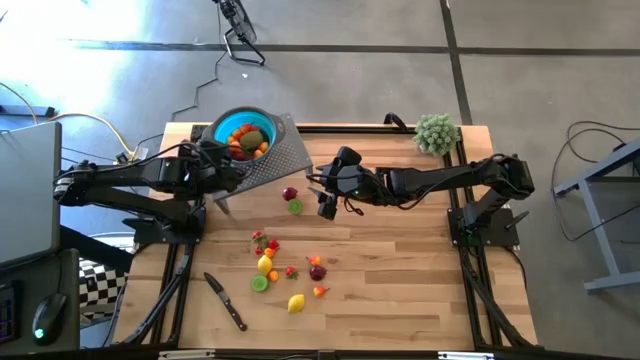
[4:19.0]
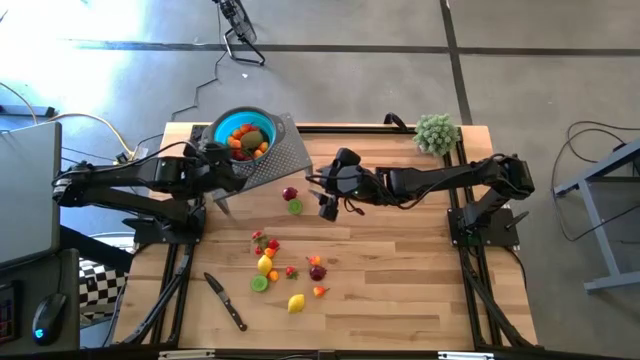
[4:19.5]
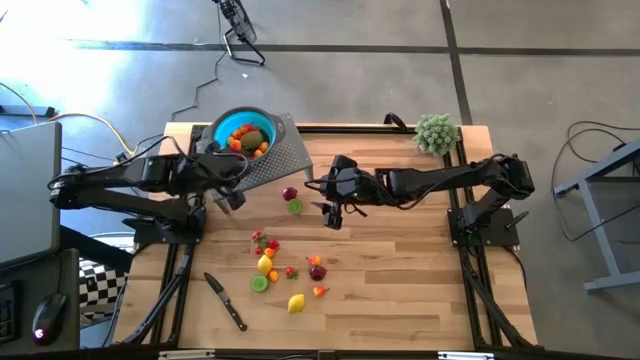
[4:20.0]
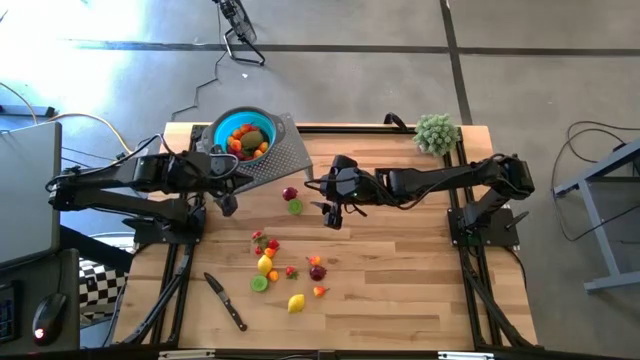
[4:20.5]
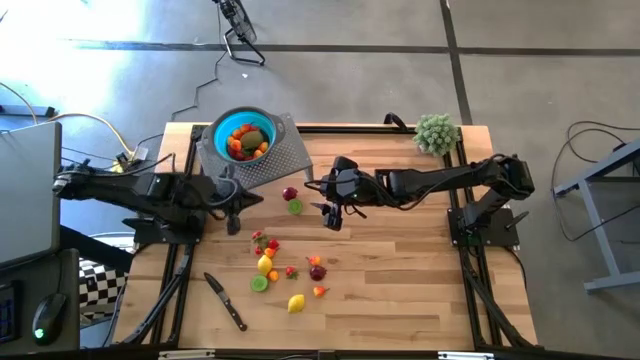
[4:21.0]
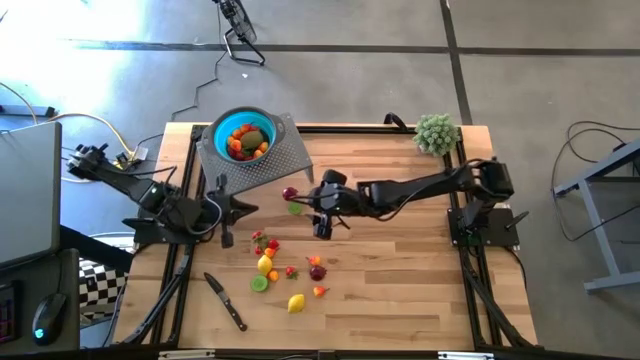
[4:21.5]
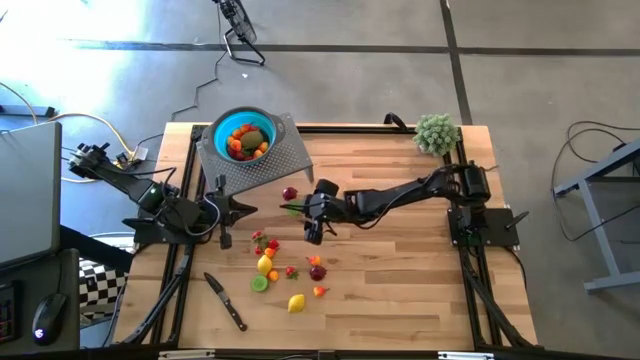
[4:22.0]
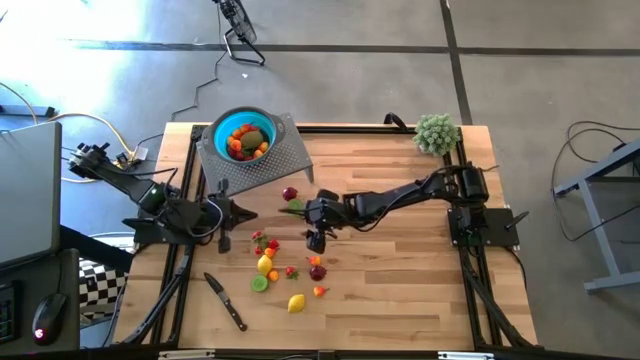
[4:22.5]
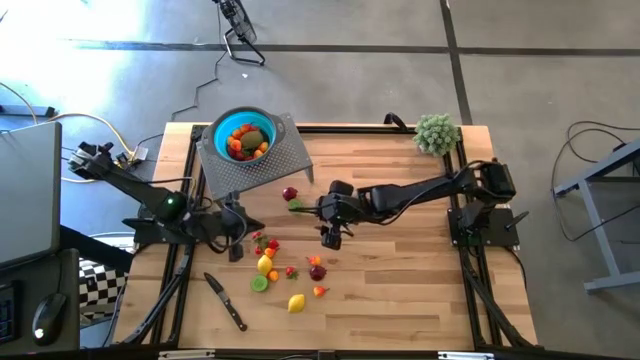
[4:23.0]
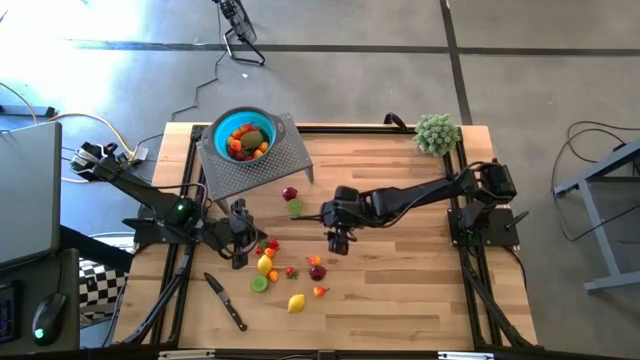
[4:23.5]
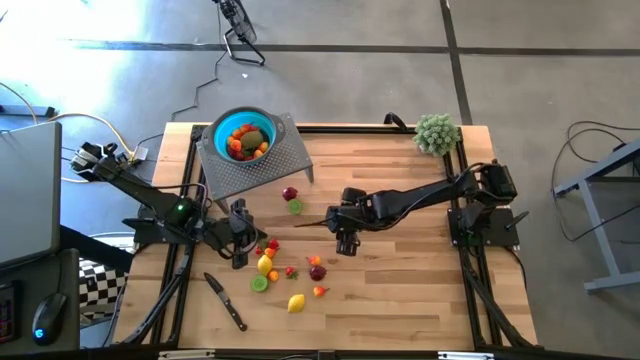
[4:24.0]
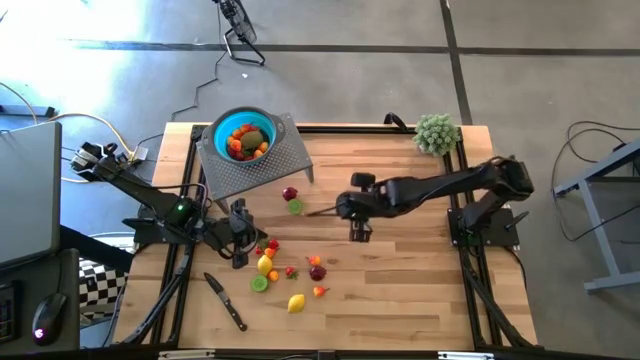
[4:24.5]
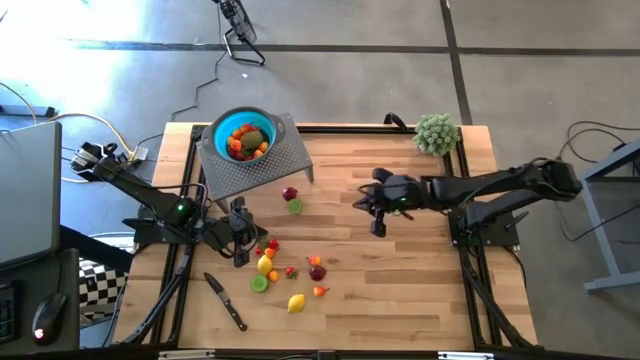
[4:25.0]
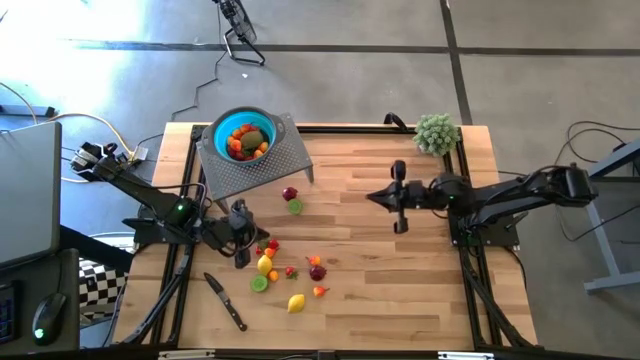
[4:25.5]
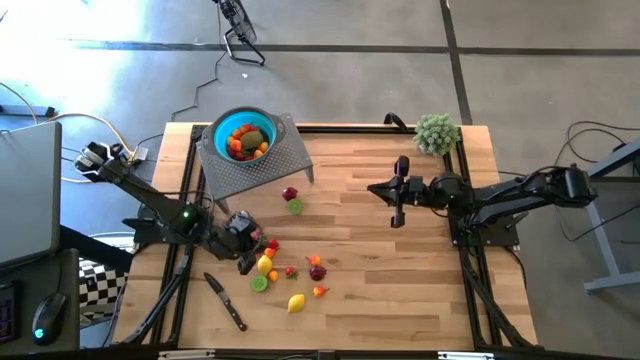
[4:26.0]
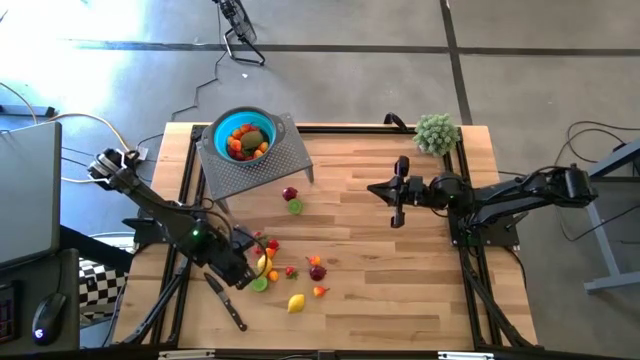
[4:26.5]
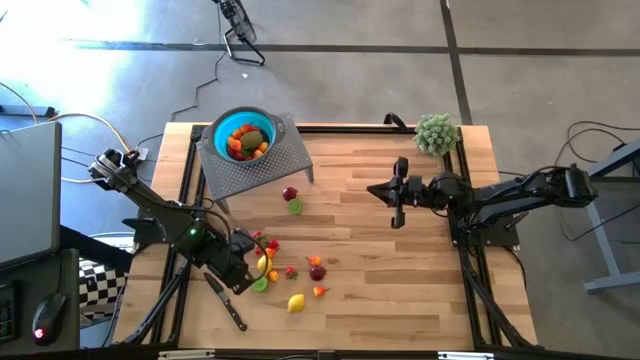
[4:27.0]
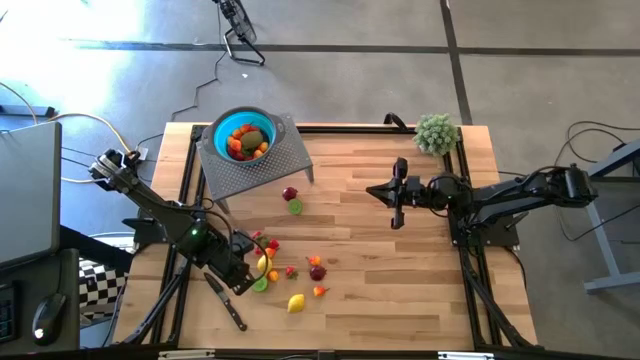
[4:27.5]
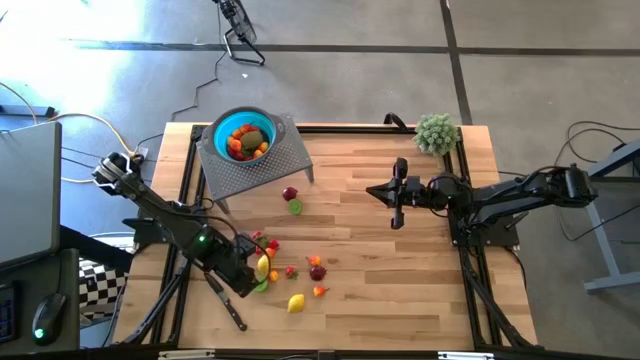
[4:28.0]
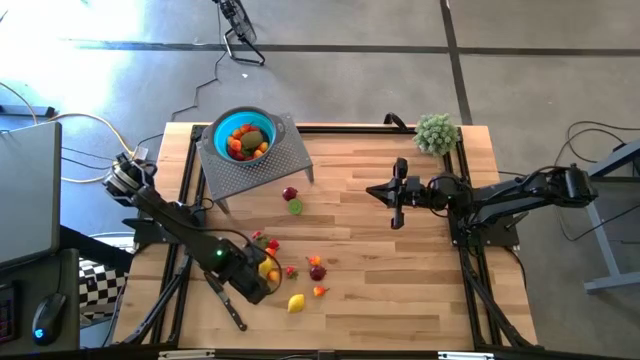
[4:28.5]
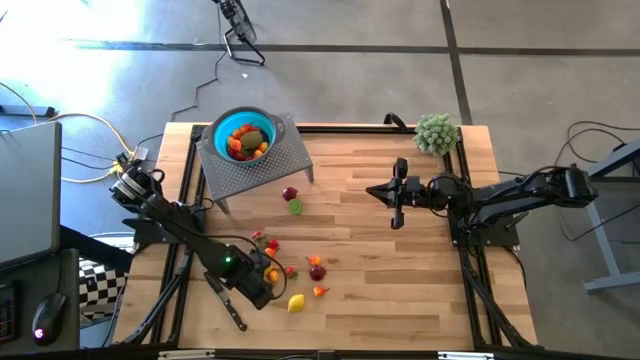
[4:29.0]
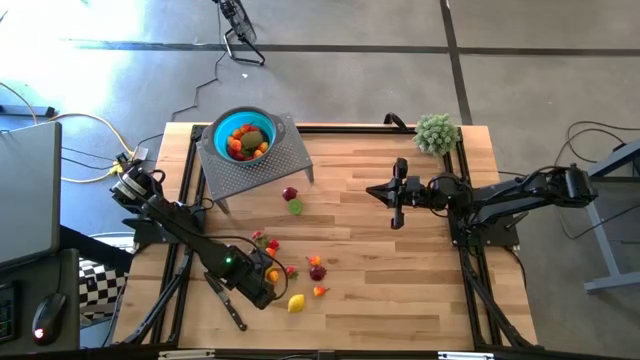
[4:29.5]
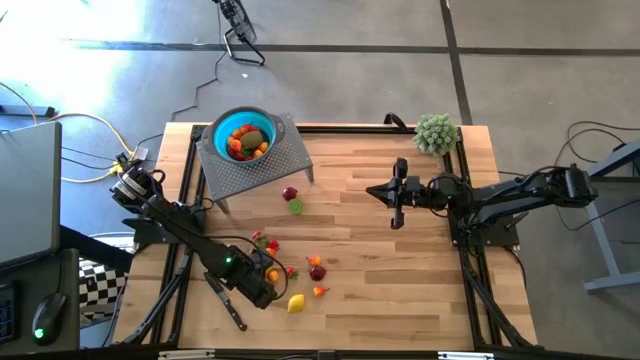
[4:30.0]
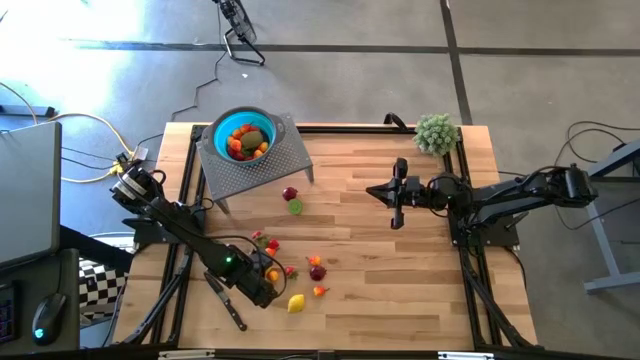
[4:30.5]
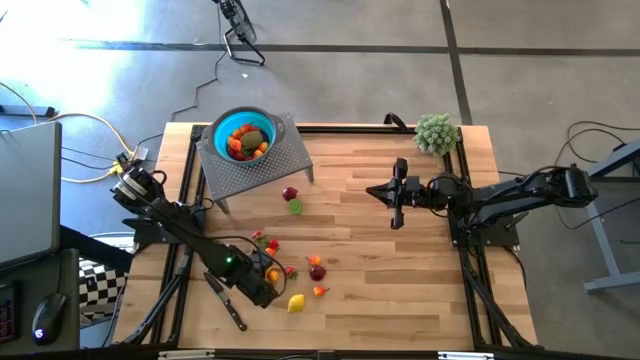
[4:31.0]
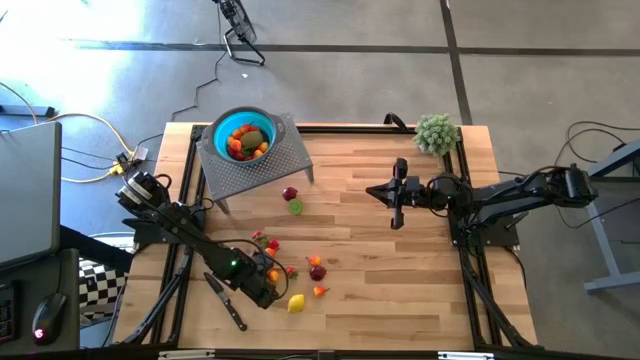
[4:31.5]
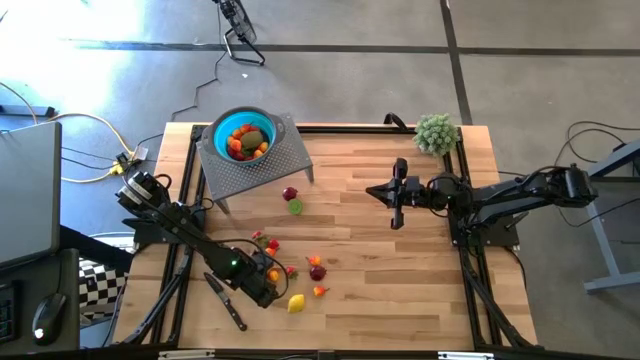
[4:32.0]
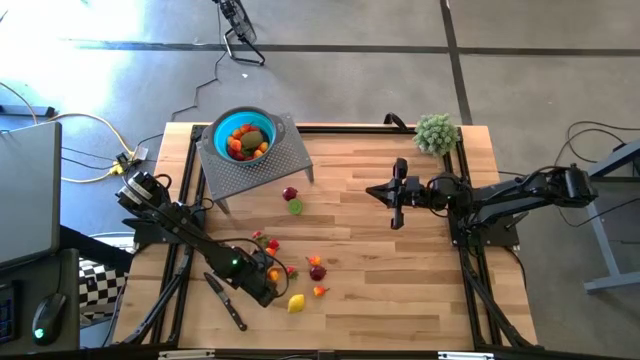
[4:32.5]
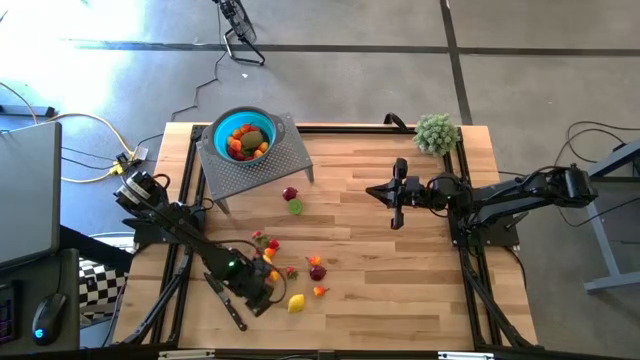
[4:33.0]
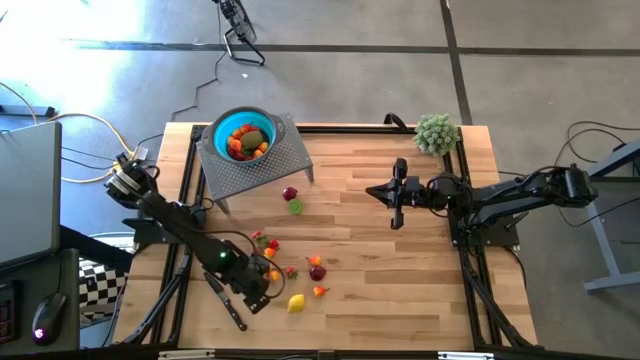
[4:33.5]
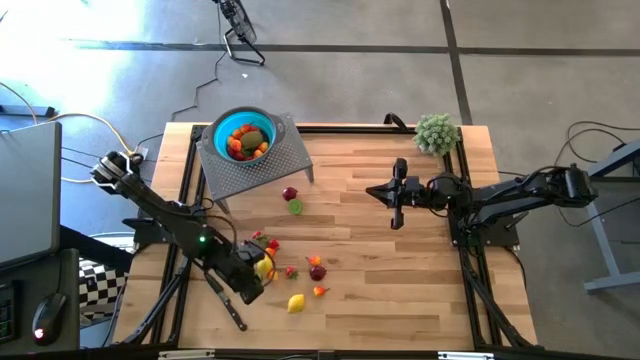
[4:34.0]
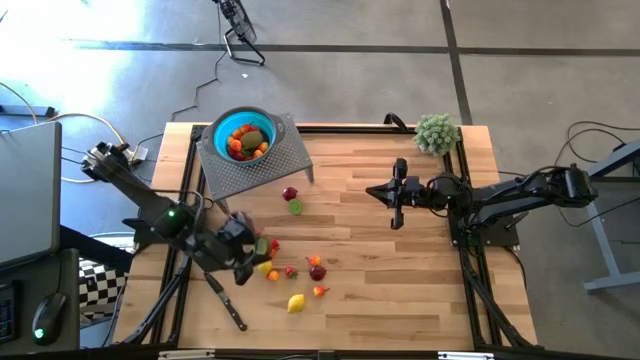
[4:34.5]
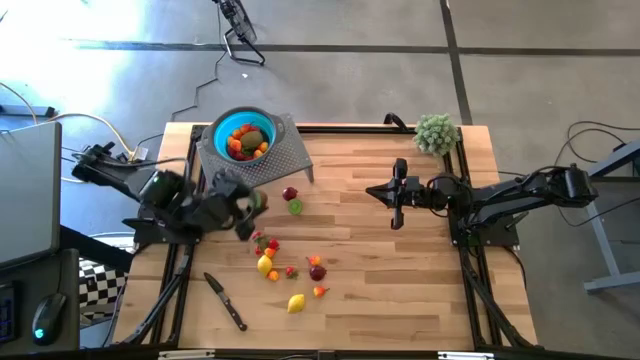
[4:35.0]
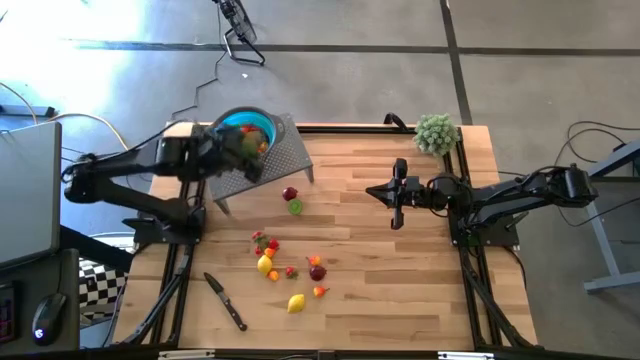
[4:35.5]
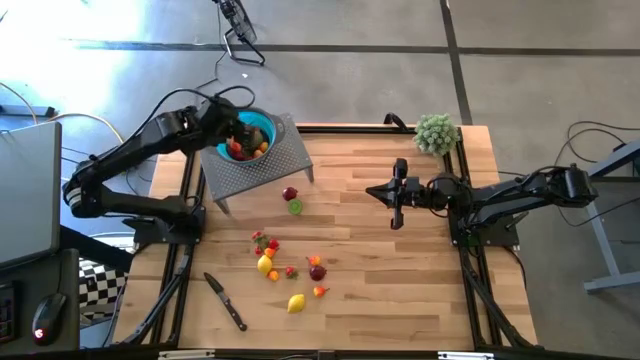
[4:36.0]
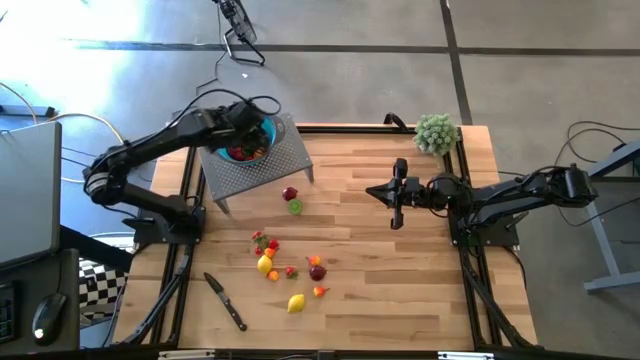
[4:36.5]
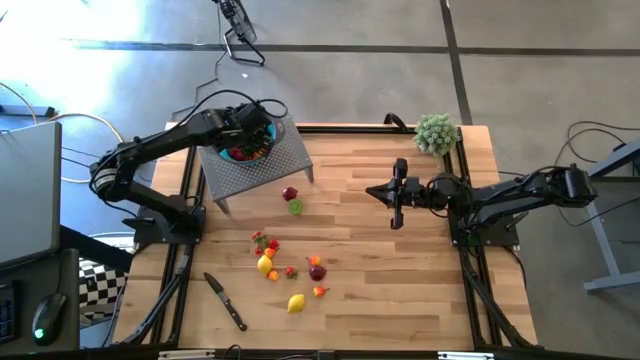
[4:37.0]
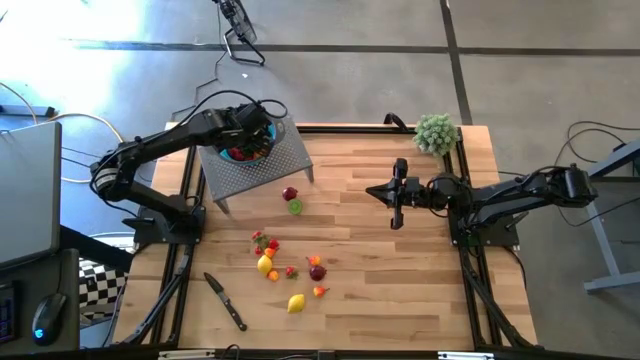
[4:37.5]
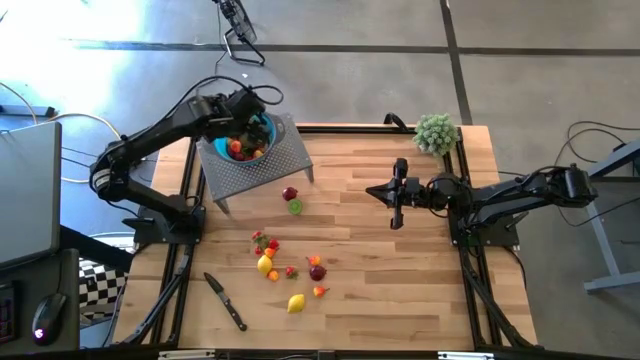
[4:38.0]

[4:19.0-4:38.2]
Task: Pick & Place Fruit
Put the half brown kiwi into the blue strainer bowl on the shelf
